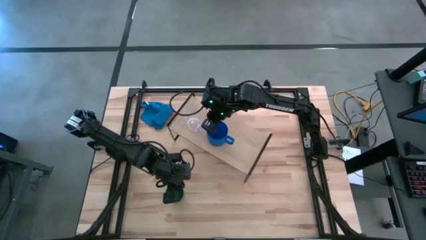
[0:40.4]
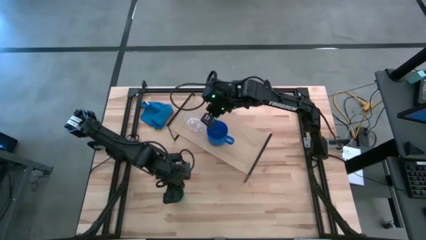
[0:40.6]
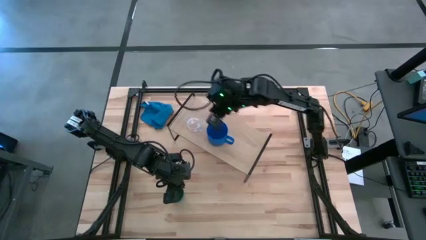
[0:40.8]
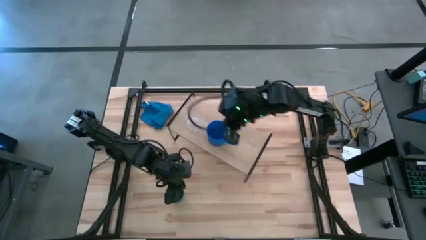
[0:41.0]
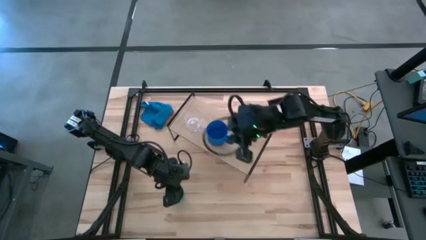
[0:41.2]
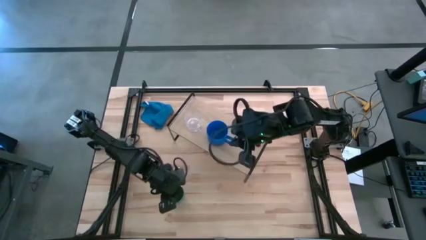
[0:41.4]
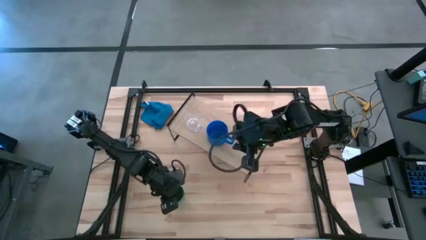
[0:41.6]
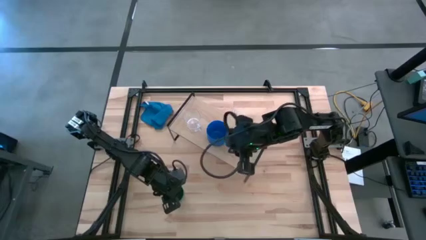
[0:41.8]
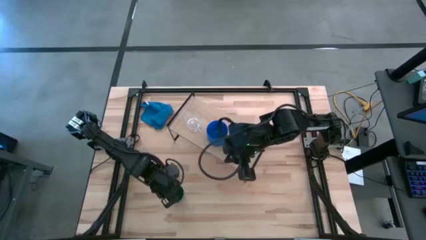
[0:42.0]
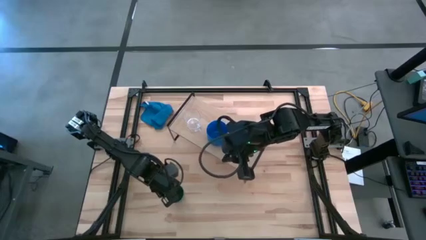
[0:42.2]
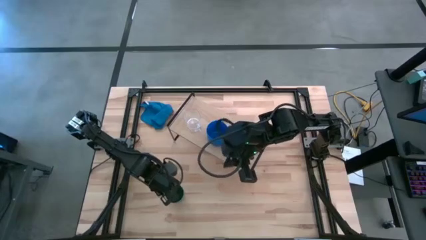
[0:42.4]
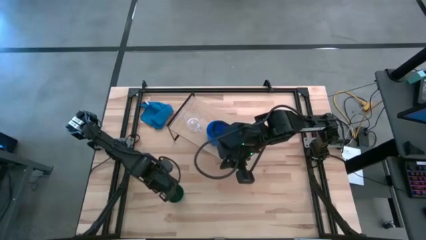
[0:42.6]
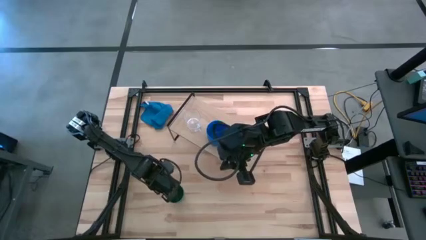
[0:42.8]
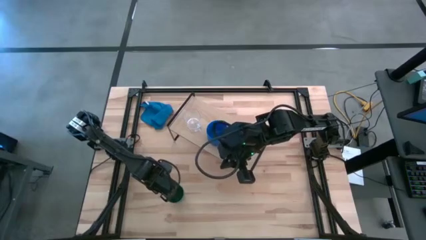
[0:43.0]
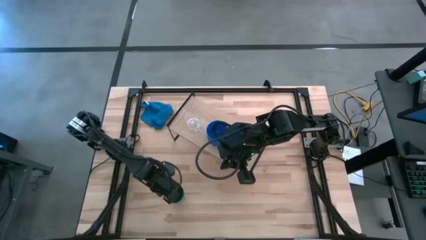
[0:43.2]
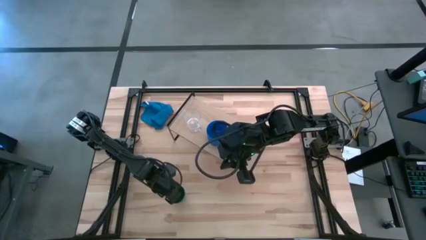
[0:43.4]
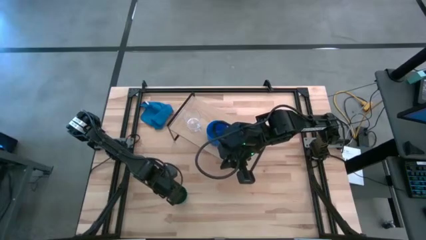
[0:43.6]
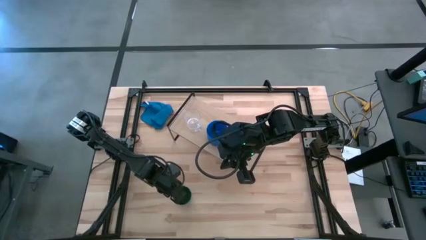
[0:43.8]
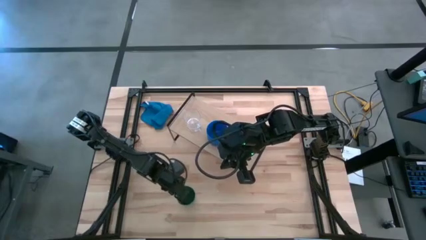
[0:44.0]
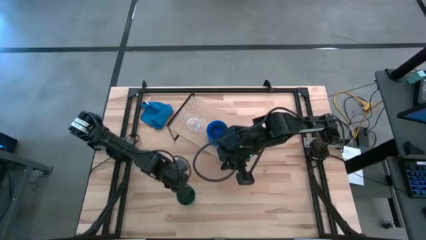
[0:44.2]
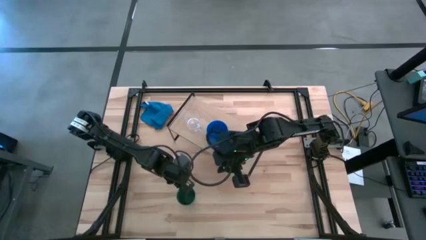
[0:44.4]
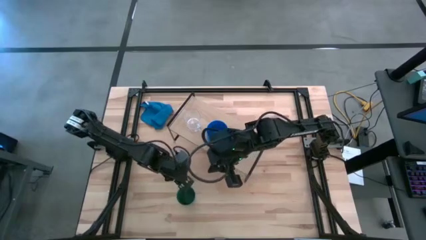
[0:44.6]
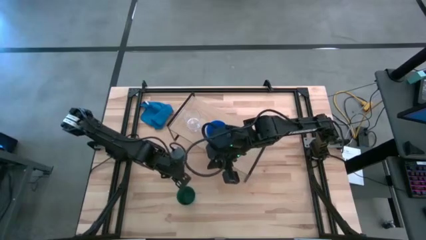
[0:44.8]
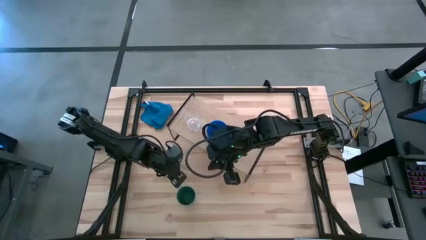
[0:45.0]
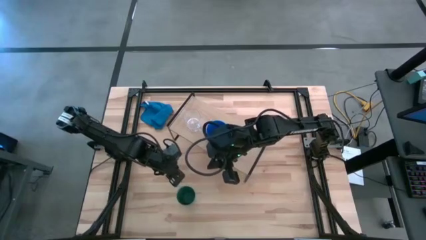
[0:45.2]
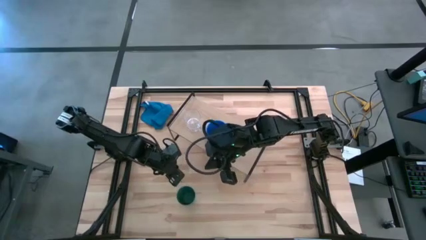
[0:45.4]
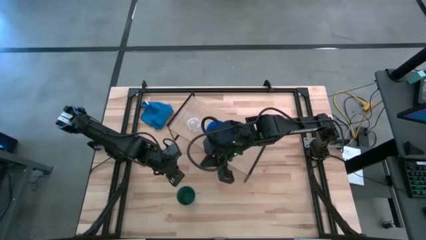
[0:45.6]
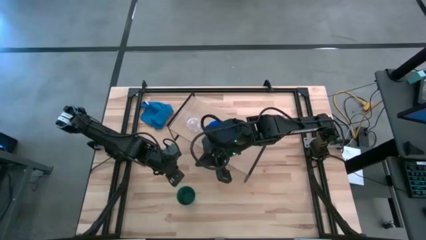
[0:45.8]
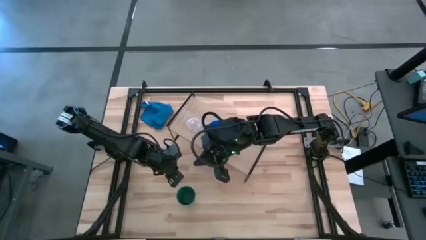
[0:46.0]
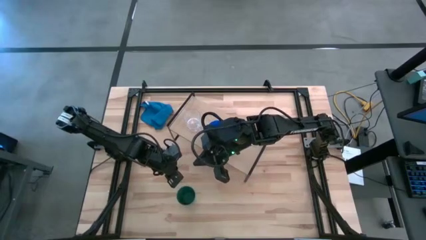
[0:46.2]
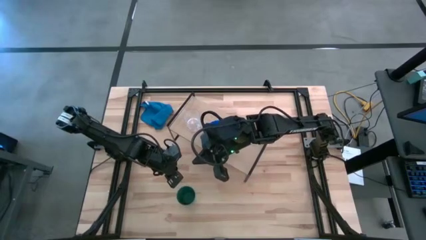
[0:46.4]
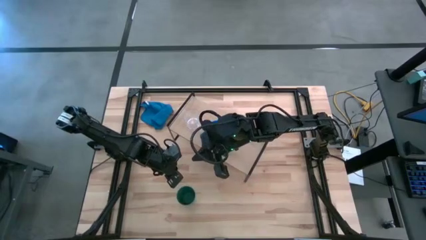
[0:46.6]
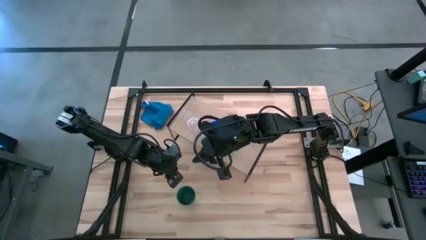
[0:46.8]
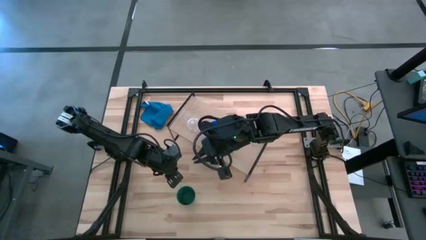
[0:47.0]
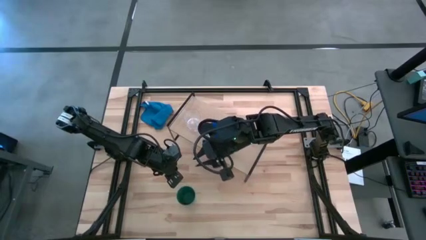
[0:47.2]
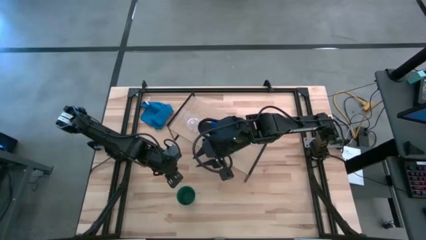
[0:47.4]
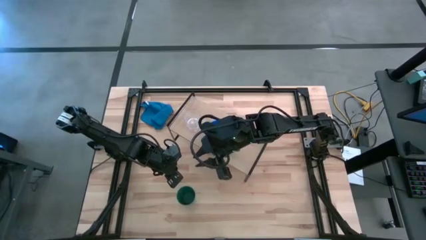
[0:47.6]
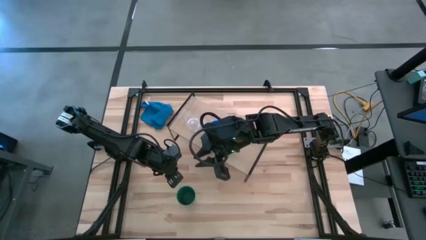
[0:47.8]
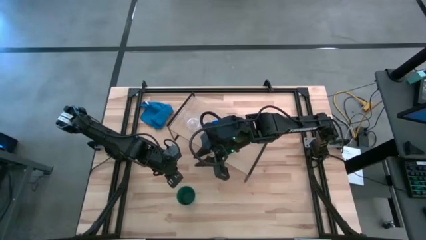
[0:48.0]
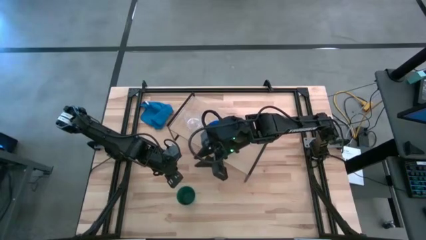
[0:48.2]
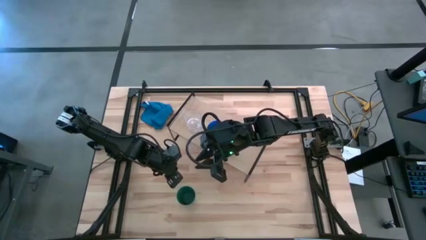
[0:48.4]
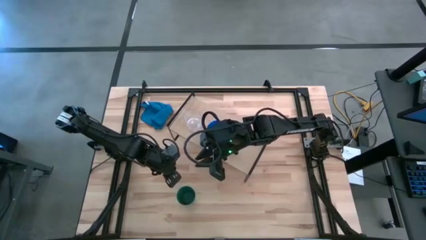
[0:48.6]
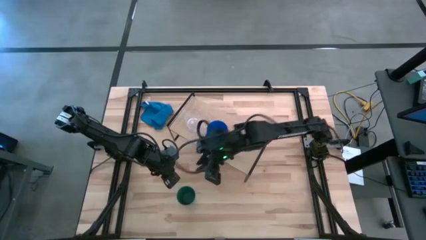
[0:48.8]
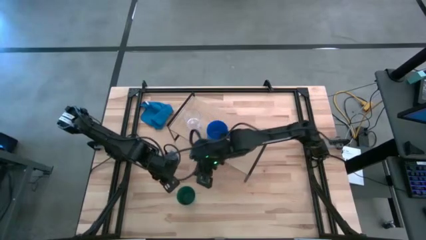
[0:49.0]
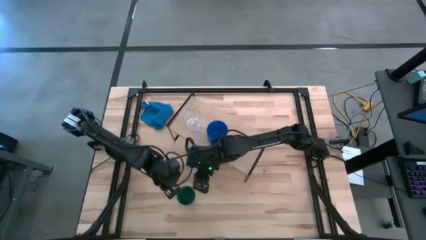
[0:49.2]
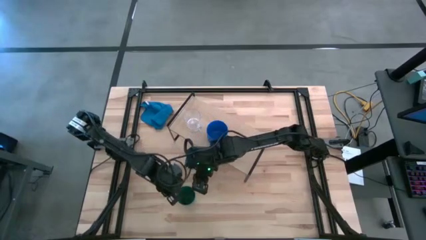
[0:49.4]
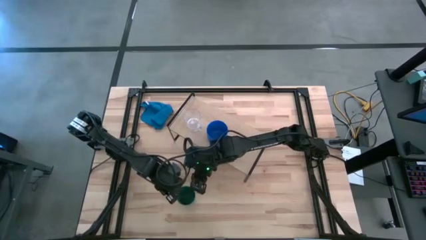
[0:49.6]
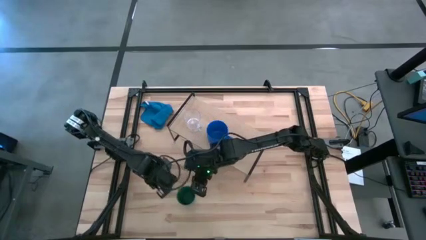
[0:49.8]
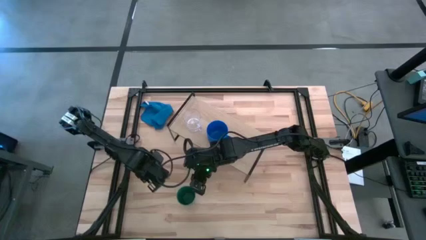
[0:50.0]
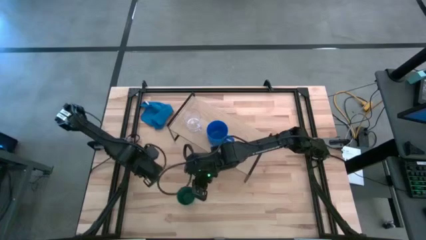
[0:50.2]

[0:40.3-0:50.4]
Task: Stack small to large cups/mugs on shelf
Put the green cup on the shelf

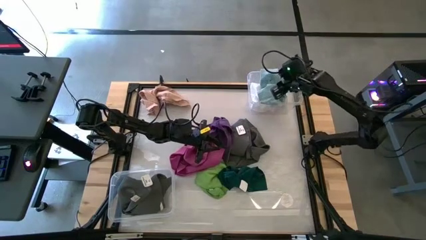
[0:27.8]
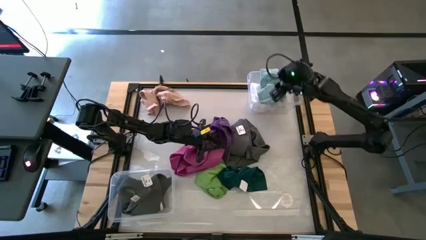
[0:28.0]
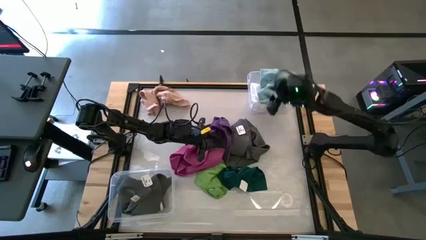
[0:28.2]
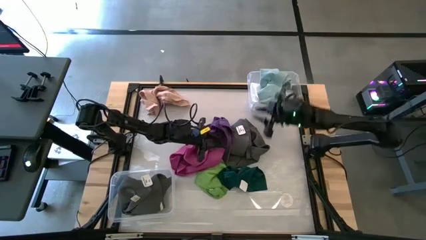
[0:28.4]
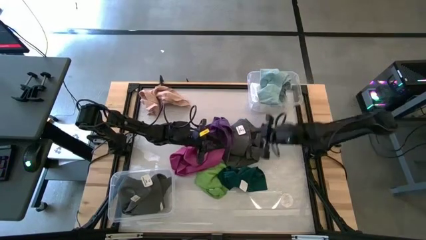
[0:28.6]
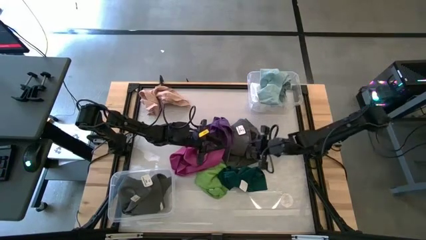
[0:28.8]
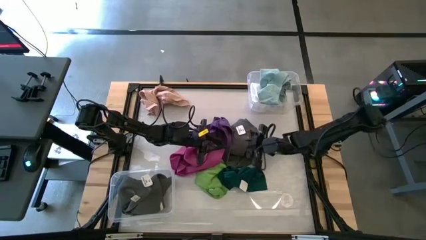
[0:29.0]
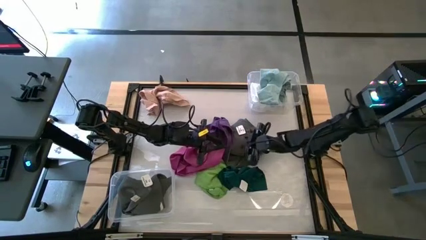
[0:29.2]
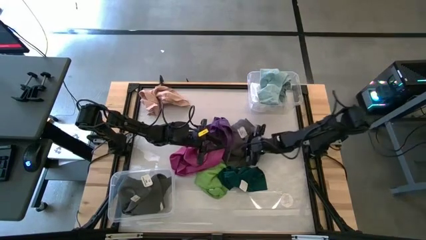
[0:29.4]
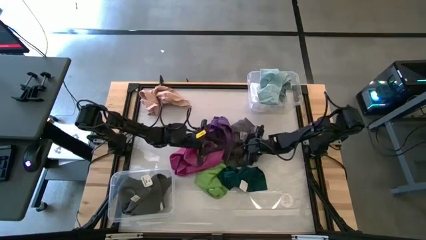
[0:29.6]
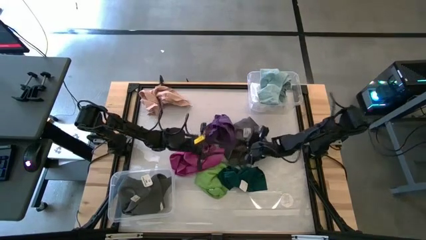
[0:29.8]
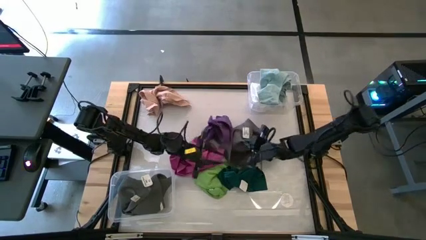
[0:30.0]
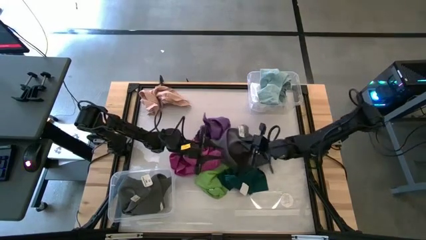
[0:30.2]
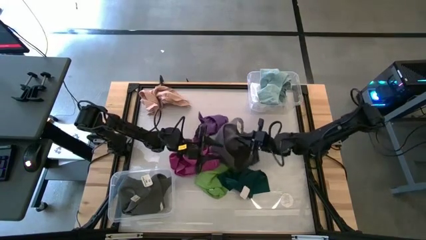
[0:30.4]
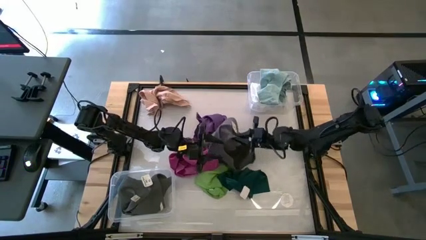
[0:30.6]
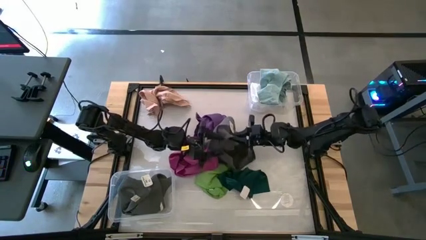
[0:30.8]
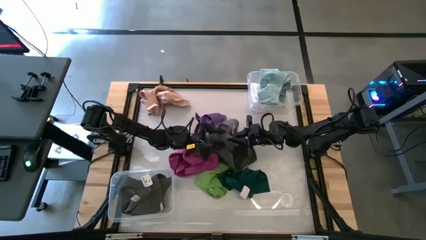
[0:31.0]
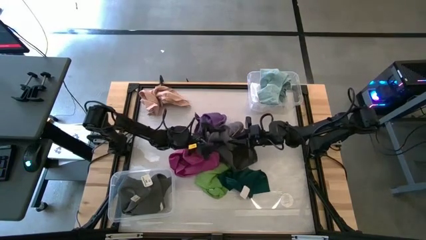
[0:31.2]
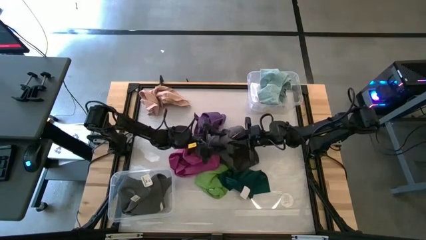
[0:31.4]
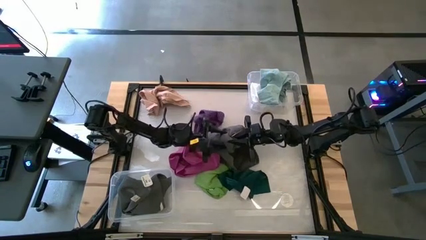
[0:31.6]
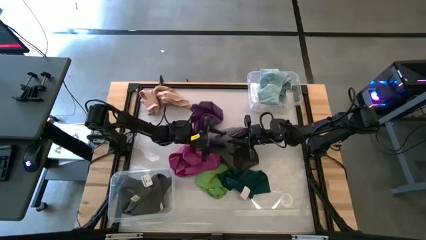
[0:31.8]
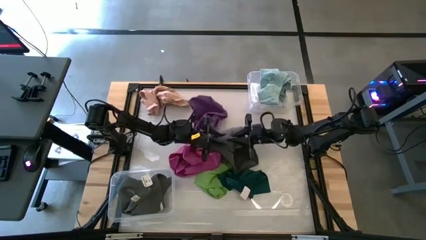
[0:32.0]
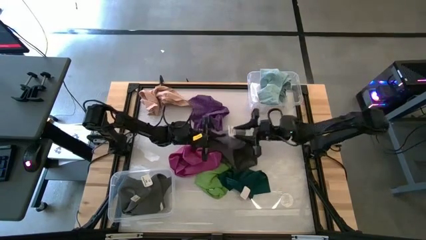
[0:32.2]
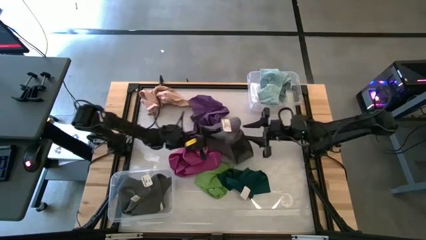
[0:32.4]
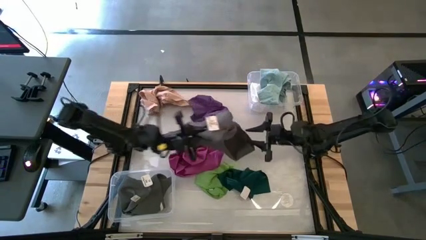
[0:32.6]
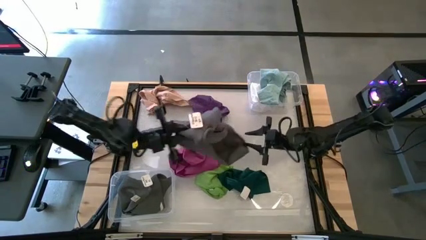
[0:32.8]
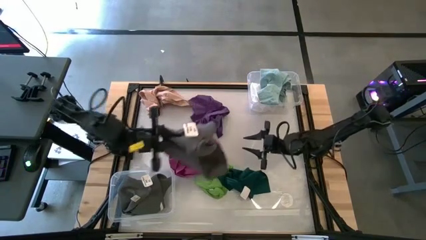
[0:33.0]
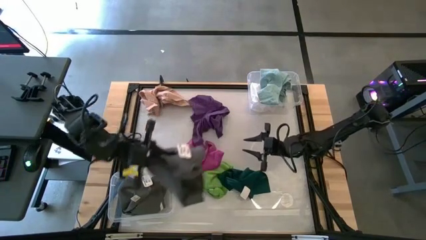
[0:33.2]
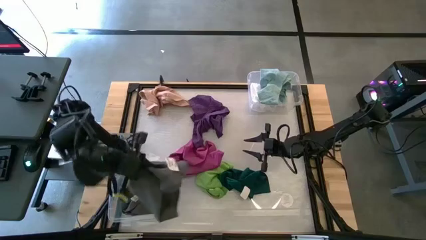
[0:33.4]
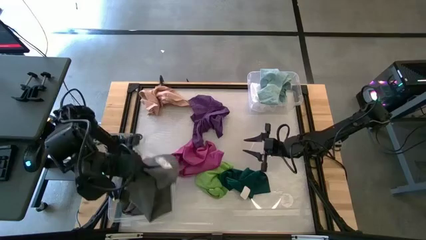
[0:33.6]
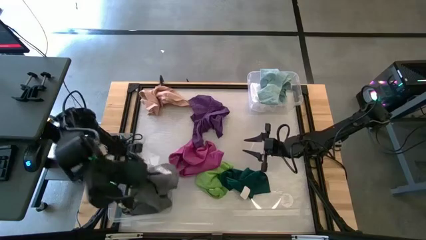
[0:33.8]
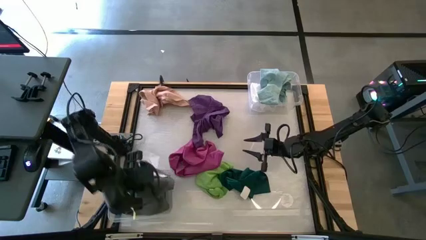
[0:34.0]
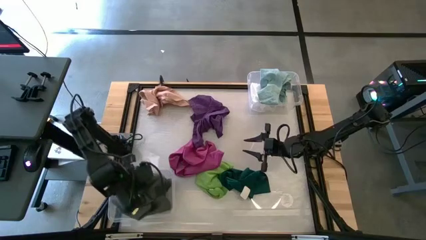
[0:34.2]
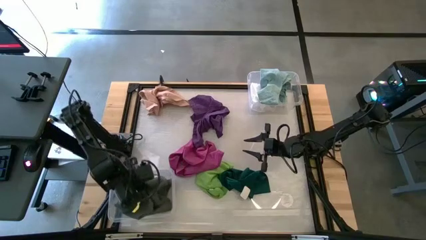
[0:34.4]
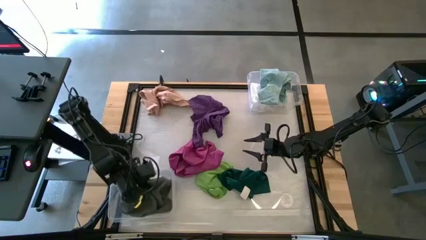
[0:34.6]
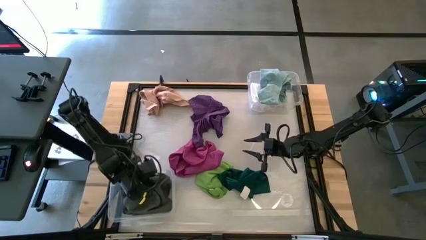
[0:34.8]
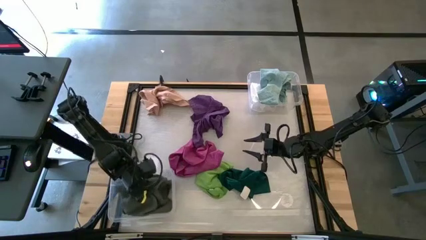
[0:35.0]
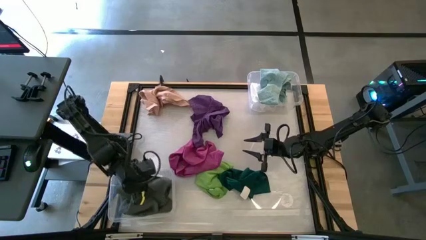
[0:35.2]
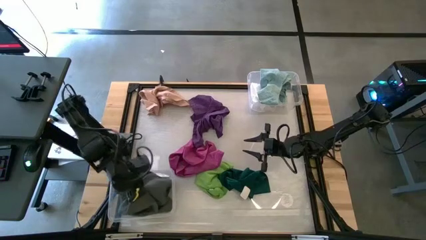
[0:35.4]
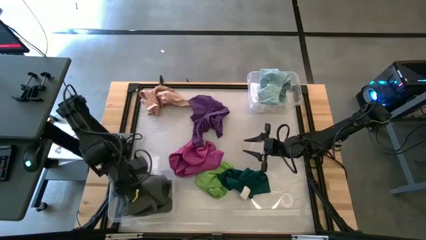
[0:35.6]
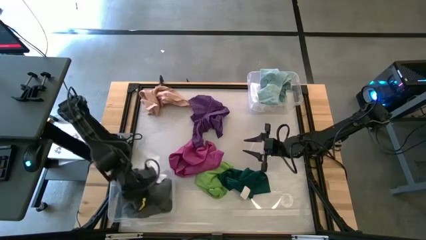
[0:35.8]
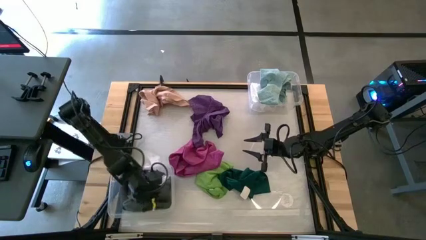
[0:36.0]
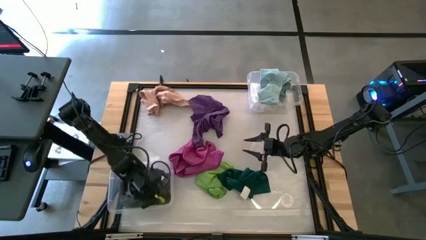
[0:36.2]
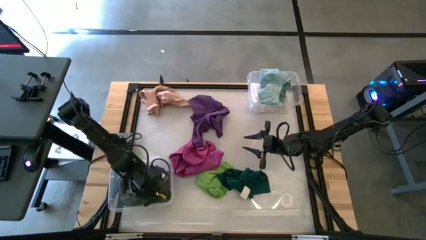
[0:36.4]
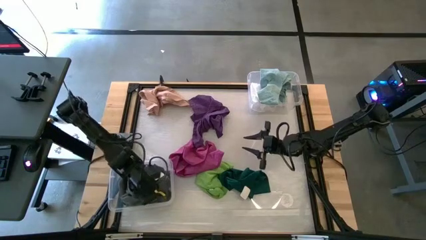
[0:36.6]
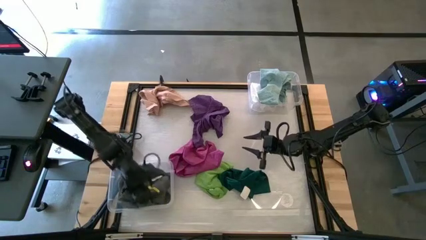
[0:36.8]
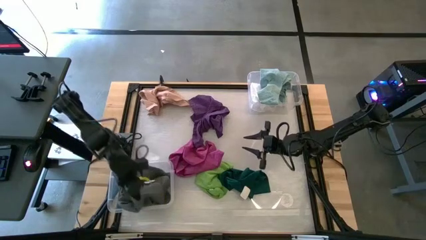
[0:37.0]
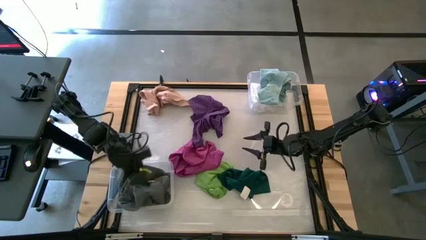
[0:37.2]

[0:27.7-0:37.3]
Task: Sort towels by color in basket
Put the gray towel into the bottom transparent bin
